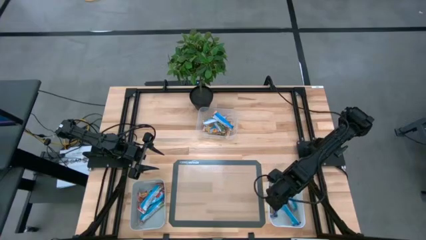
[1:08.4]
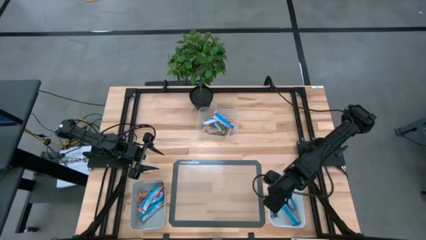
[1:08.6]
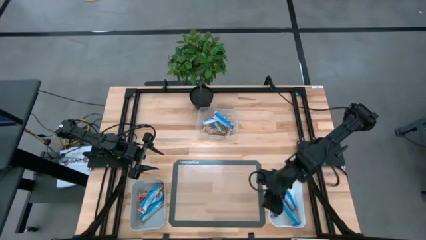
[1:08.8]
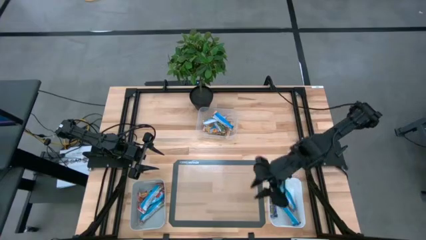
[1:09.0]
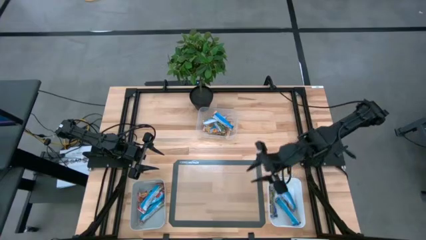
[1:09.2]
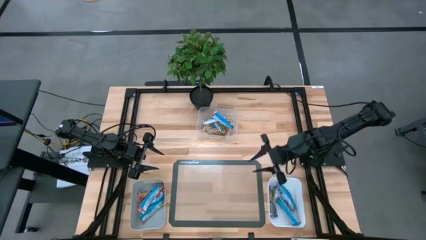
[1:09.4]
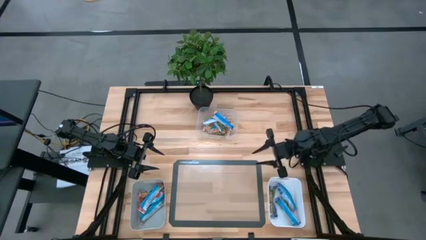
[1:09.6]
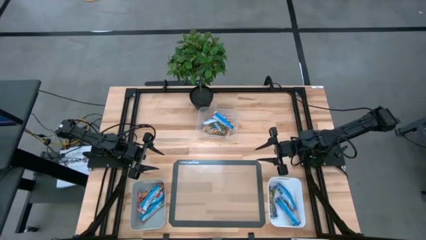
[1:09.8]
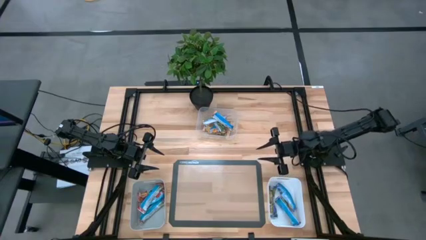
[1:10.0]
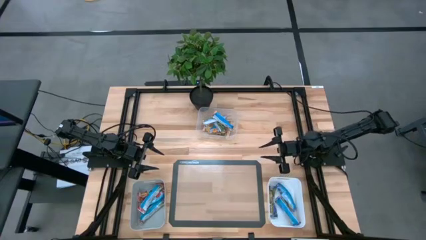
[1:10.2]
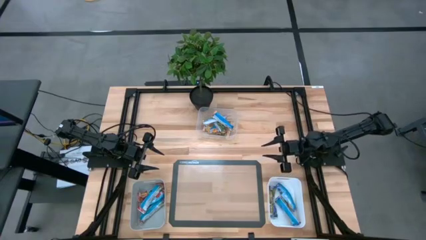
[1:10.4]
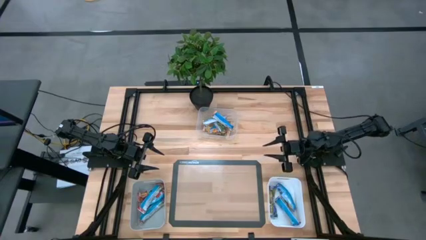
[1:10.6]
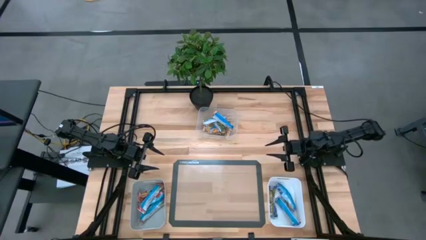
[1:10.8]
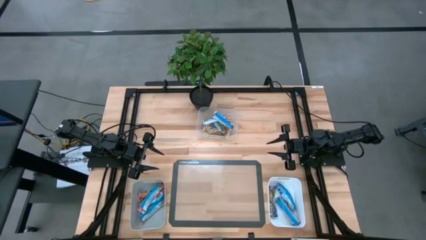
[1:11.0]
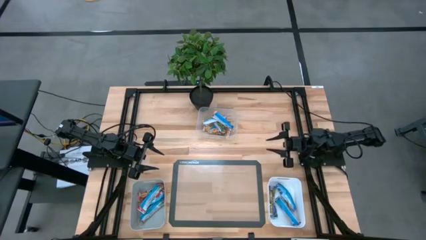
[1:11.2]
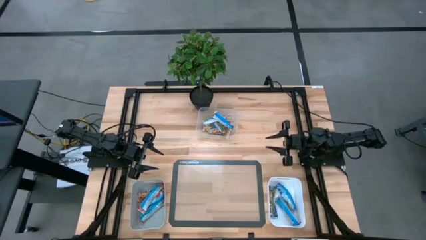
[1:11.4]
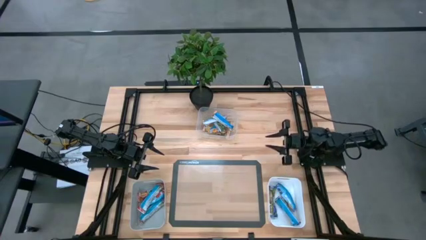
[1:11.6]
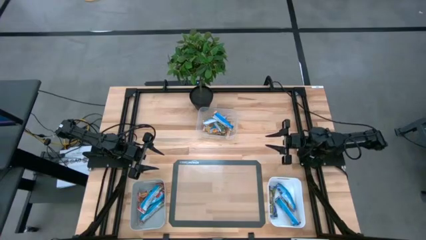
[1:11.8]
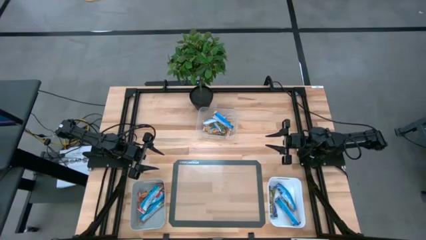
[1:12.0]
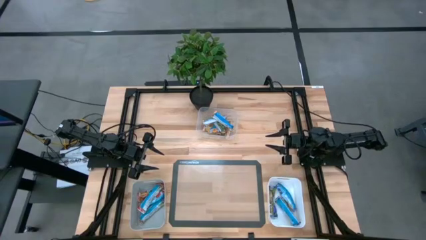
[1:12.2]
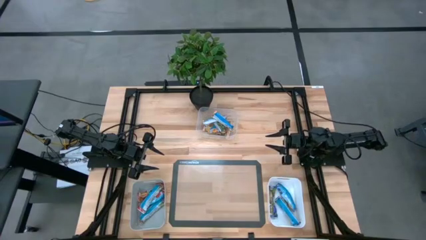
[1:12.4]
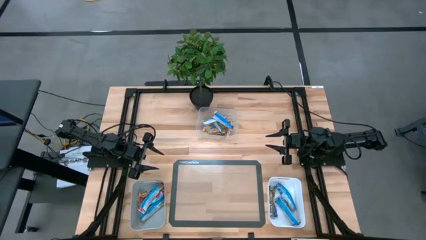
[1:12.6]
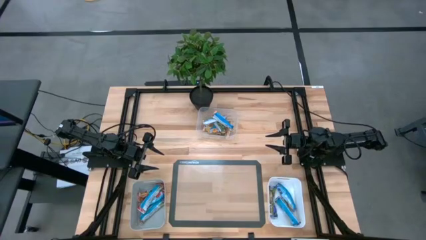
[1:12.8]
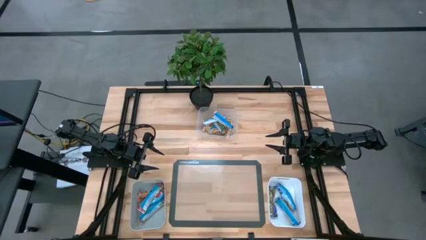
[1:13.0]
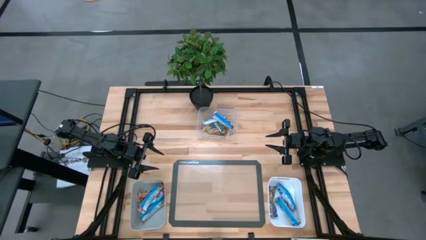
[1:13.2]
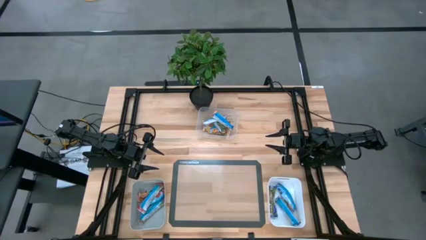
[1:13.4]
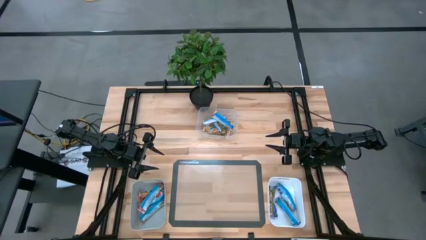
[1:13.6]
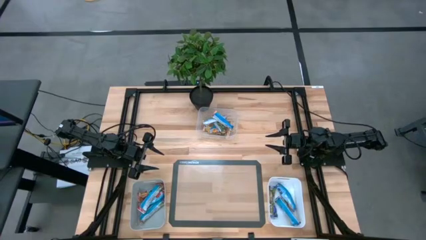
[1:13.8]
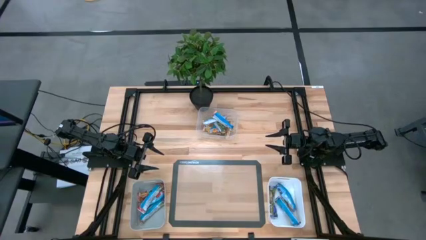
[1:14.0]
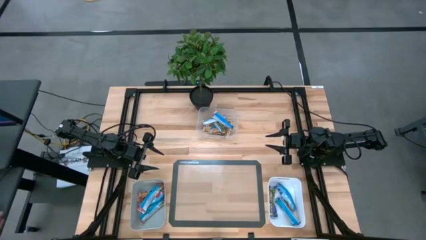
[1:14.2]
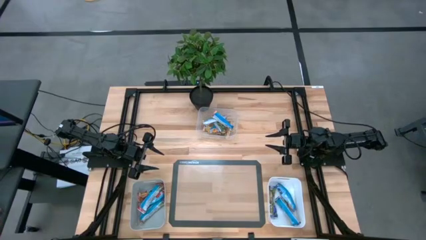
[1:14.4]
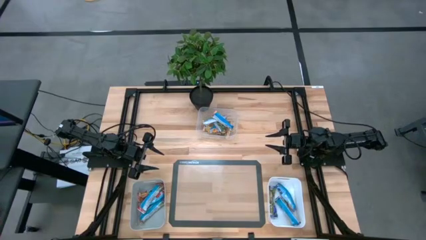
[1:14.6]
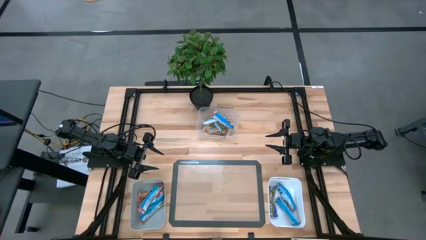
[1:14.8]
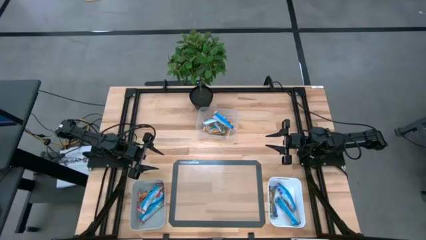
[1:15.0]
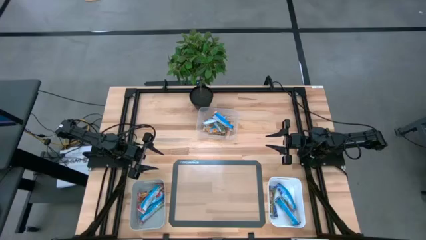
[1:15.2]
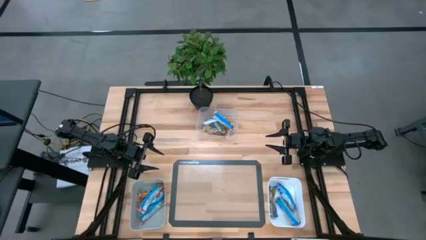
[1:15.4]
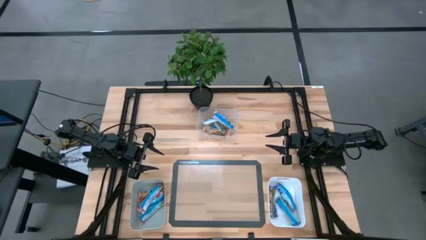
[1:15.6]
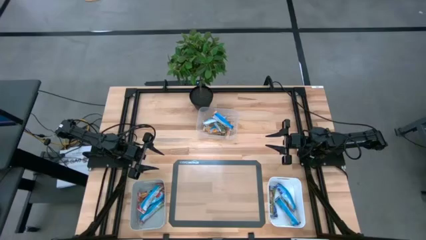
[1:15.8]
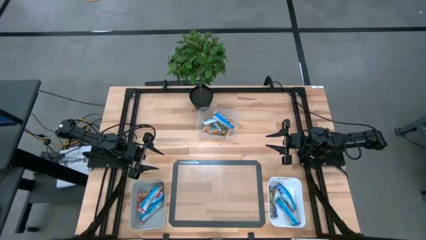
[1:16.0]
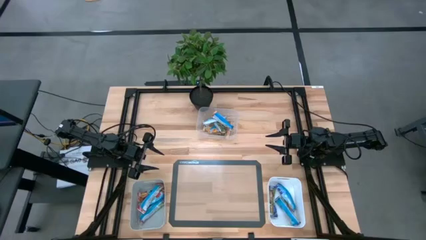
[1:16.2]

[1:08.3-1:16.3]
Task: Pick and place Granola Bars by type
Return to Home Position

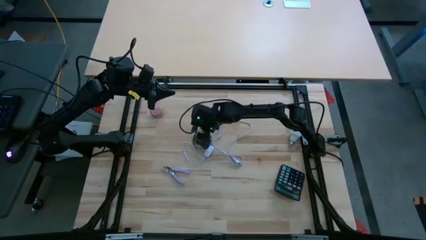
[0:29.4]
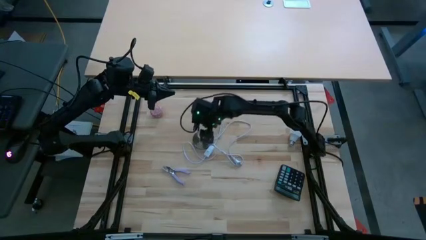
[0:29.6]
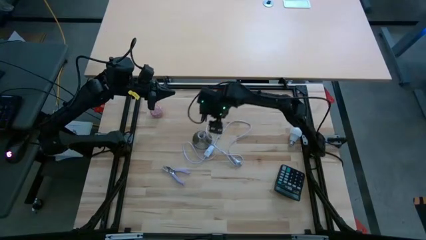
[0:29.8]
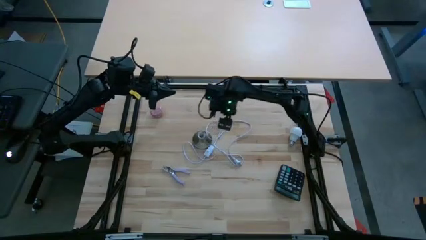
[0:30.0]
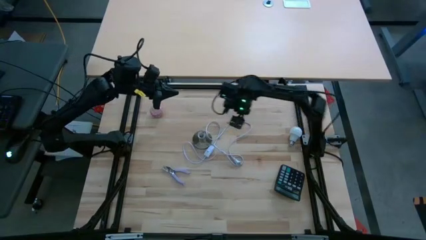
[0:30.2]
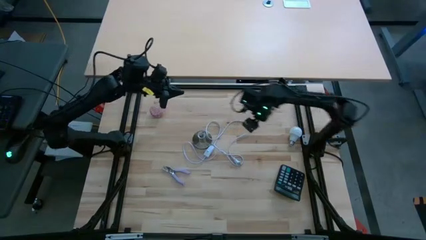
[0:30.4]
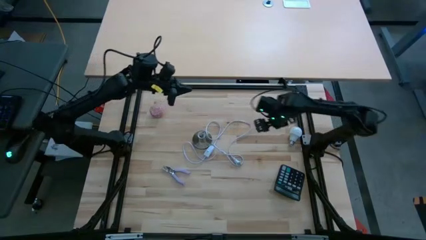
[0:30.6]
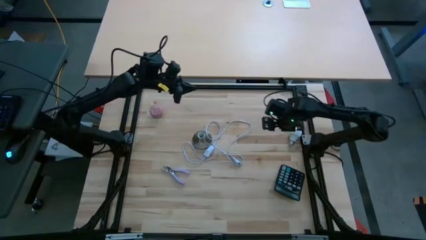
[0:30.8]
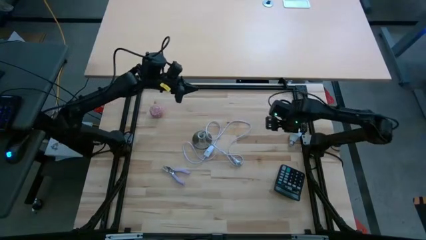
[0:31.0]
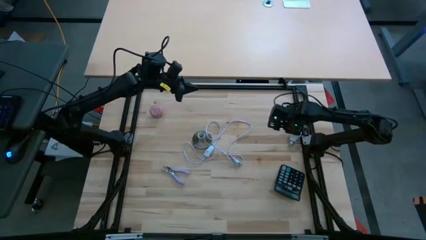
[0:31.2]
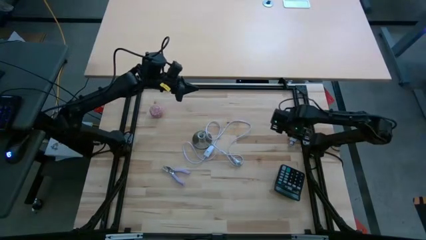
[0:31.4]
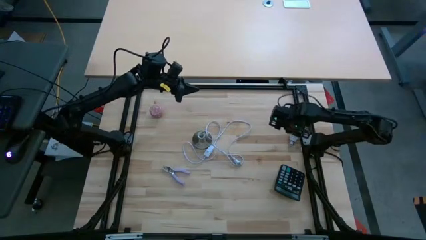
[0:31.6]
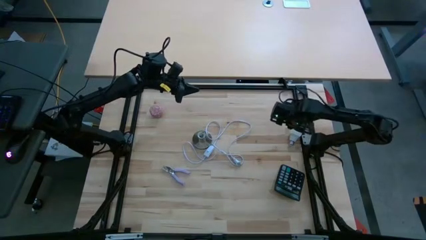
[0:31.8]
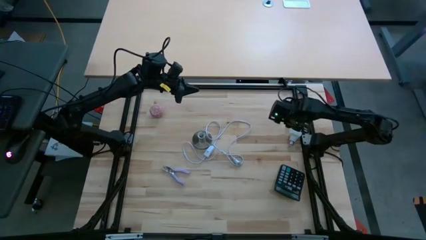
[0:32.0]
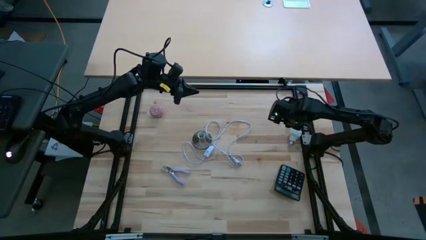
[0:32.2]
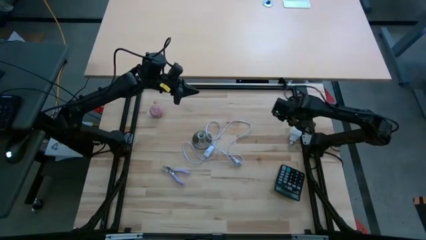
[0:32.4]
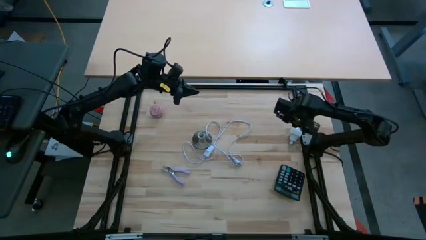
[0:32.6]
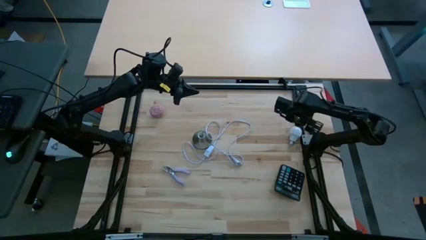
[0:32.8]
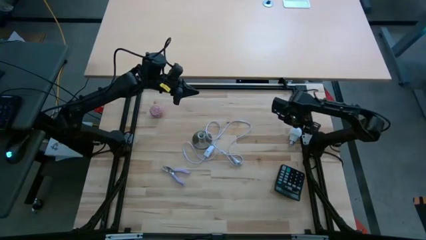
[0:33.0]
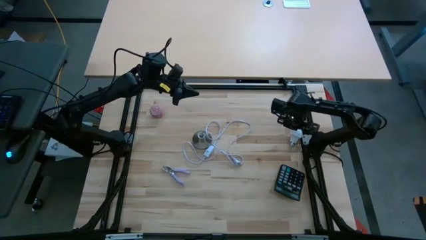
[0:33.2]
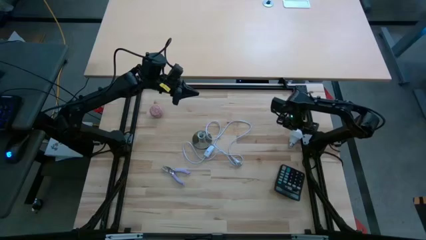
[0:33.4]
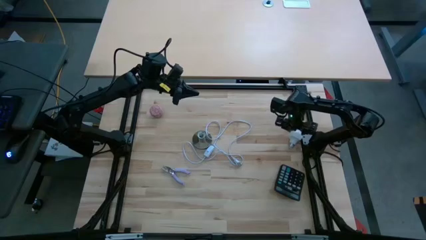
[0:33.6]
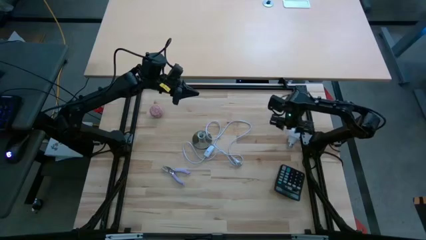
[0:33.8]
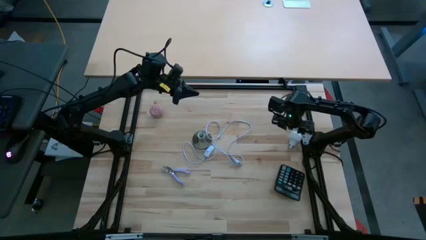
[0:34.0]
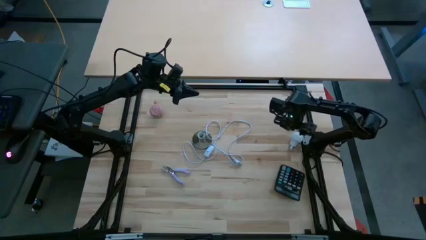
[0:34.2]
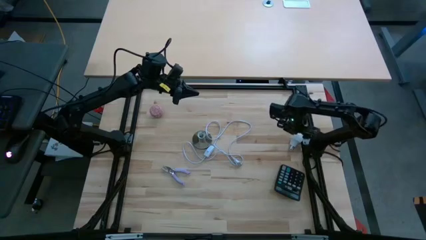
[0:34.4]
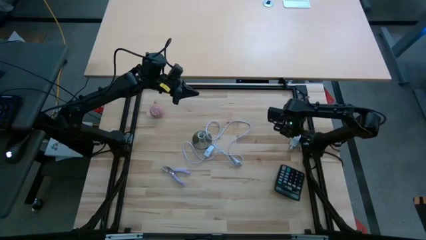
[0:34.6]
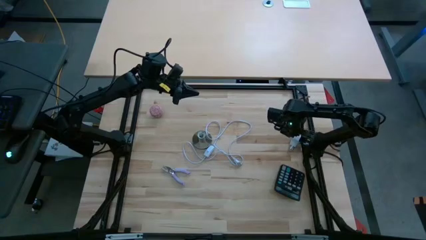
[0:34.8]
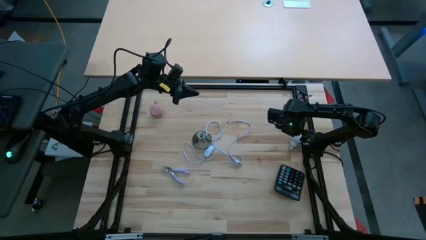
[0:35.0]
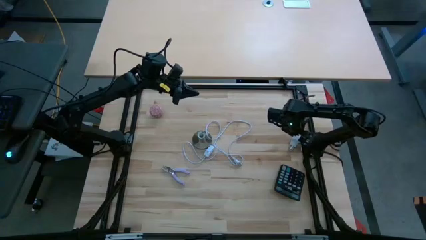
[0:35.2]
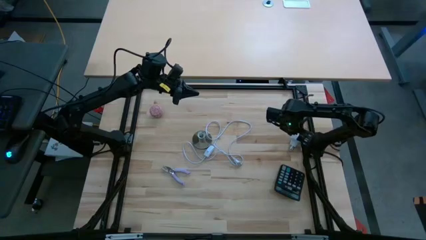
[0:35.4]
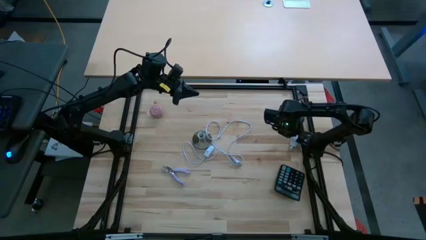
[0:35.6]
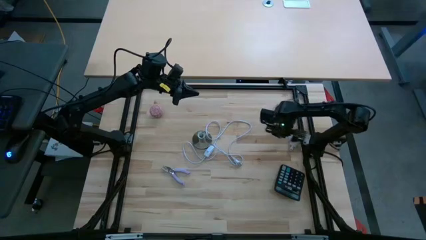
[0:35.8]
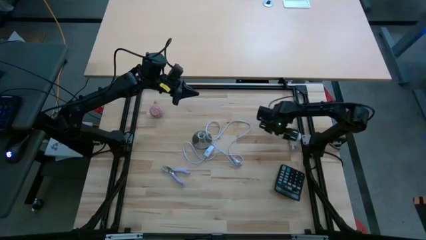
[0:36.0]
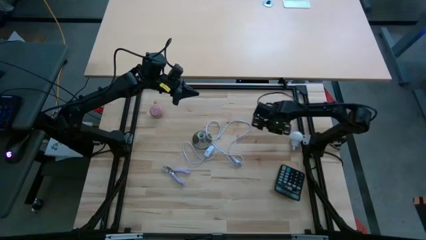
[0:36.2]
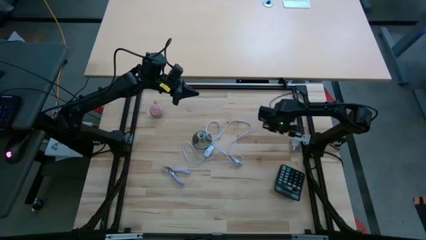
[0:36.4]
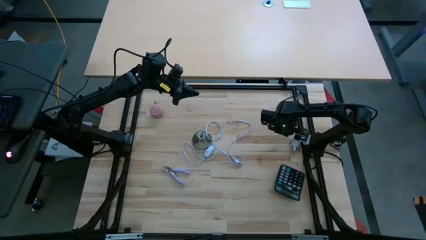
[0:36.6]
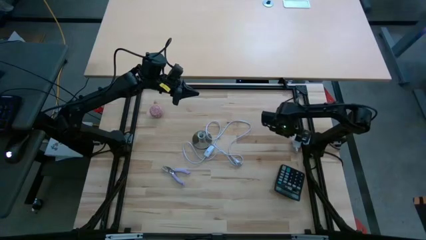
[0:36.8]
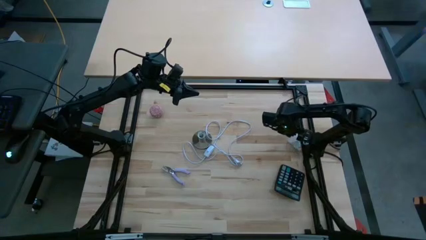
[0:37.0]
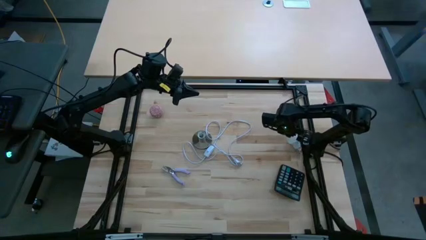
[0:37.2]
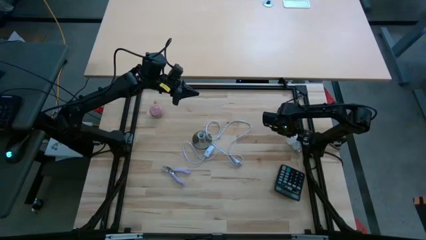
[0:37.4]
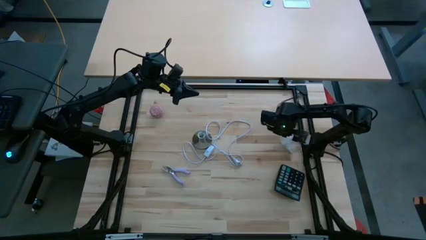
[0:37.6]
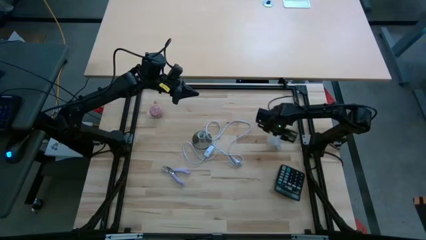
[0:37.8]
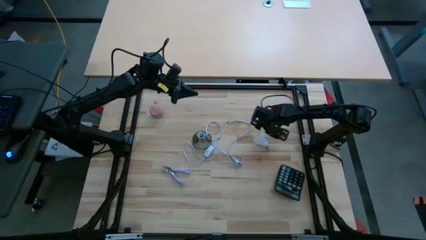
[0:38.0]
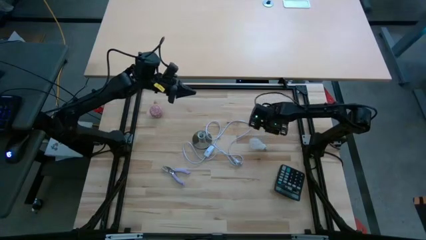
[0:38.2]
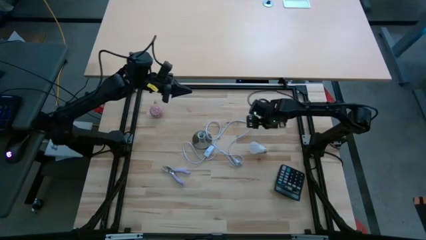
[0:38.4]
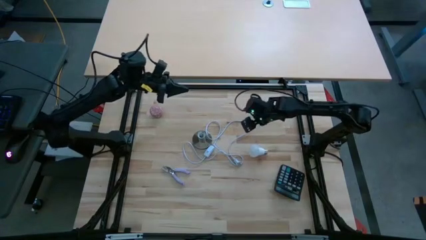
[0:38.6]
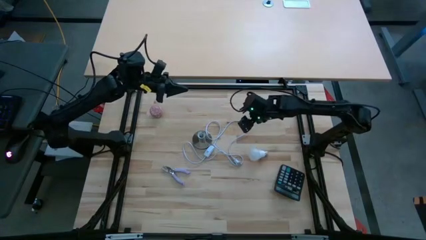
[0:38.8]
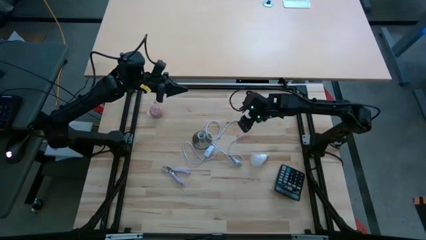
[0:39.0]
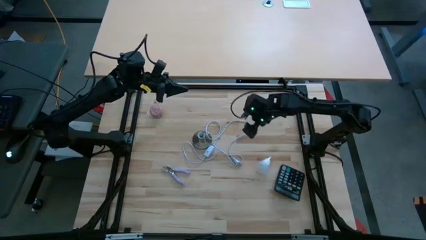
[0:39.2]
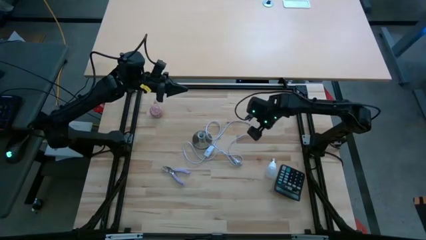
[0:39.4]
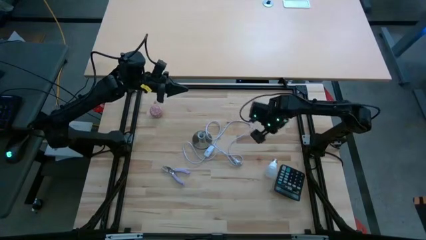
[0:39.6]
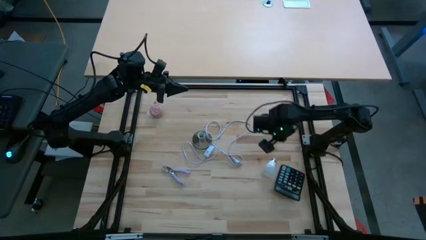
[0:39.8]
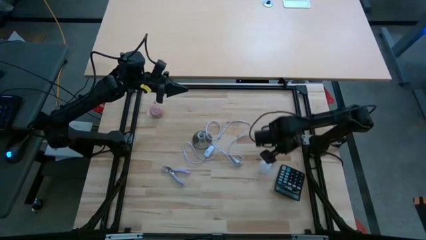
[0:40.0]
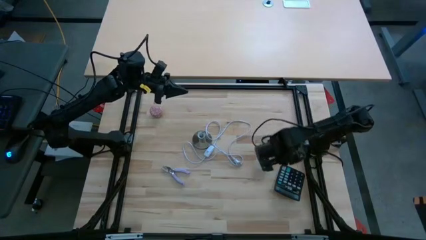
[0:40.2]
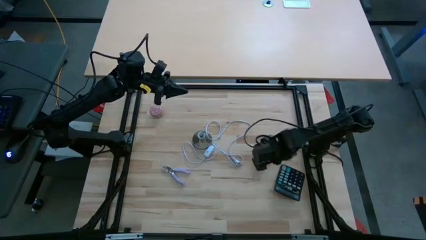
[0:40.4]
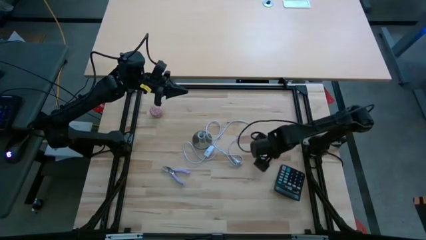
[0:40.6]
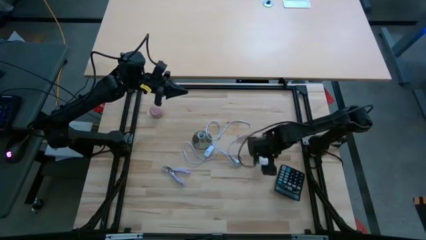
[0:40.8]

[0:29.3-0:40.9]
Task: Screw lightbulb
Insert the lightbulb into the lamp
